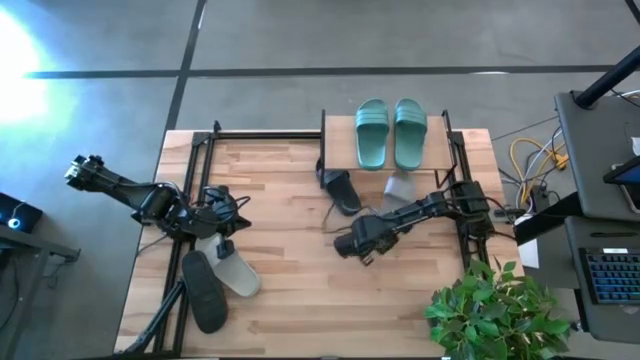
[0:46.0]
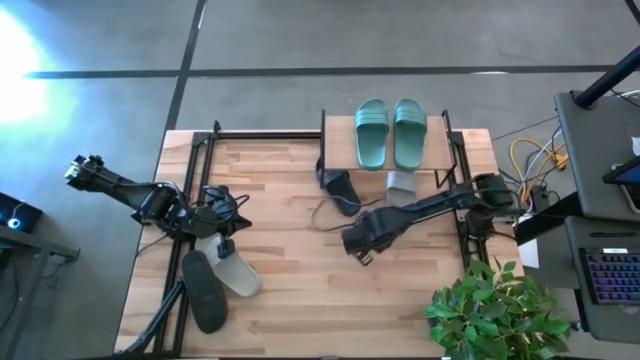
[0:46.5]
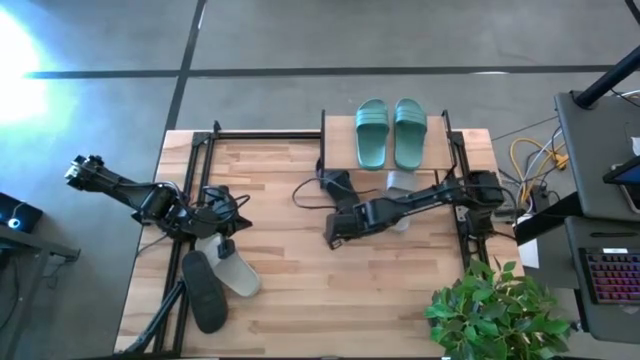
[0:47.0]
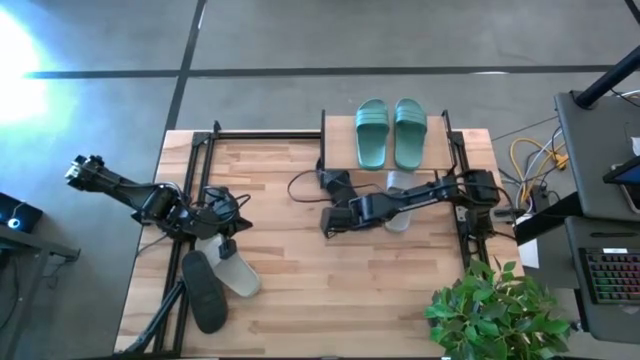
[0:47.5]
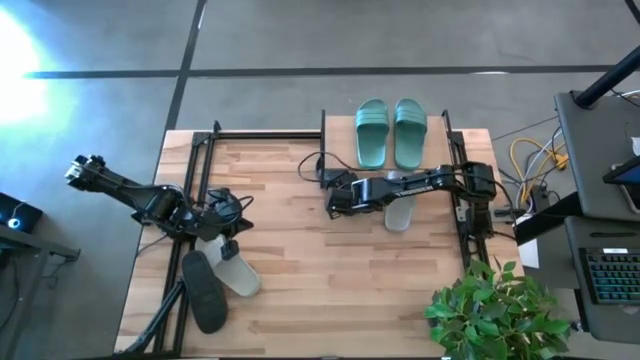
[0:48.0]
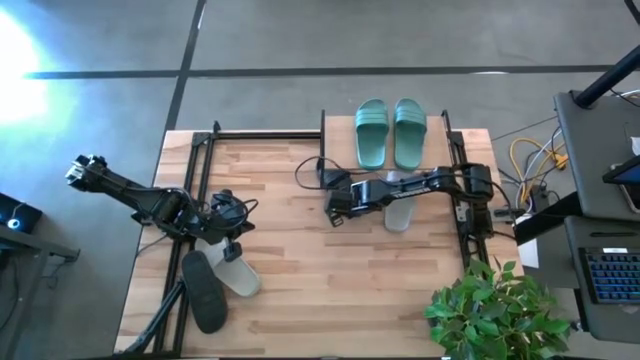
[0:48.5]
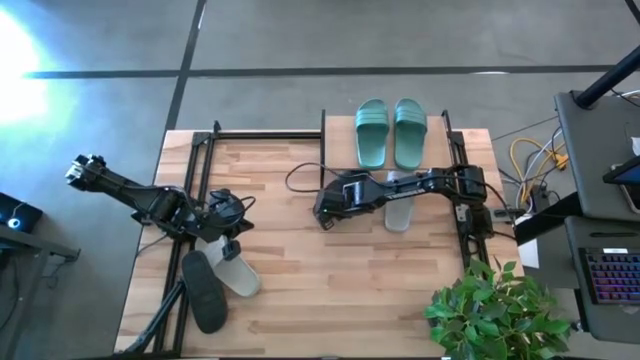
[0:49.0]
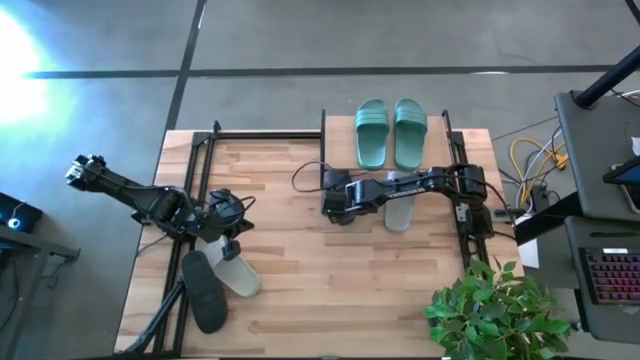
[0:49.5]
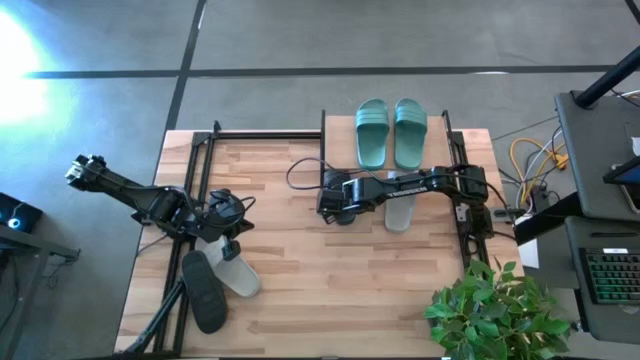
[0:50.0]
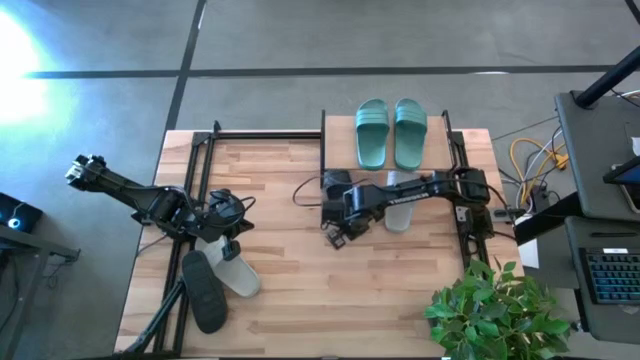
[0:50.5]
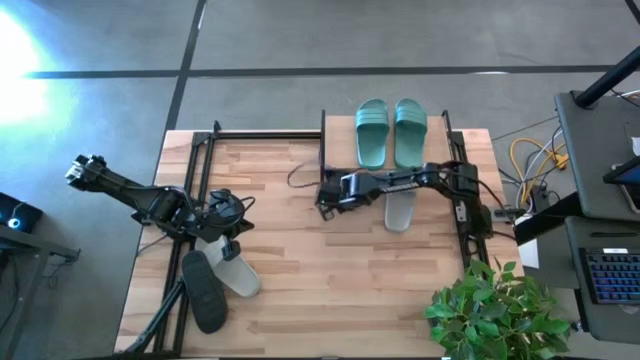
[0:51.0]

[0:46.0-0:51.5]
Task: Pick and place slides into the shelf
Adjust the black slipper under the shelf

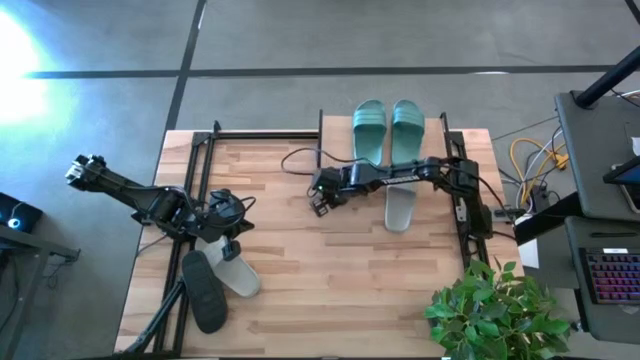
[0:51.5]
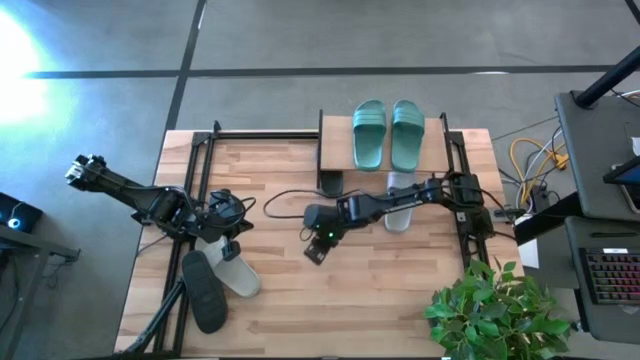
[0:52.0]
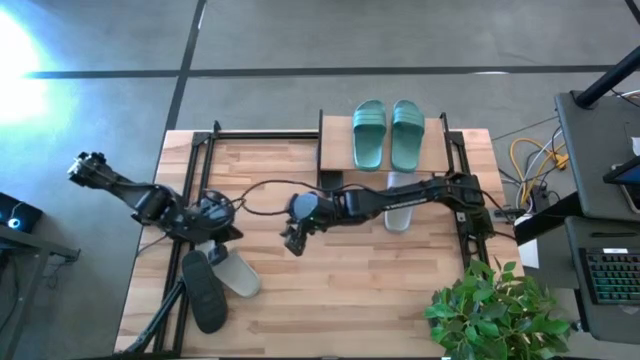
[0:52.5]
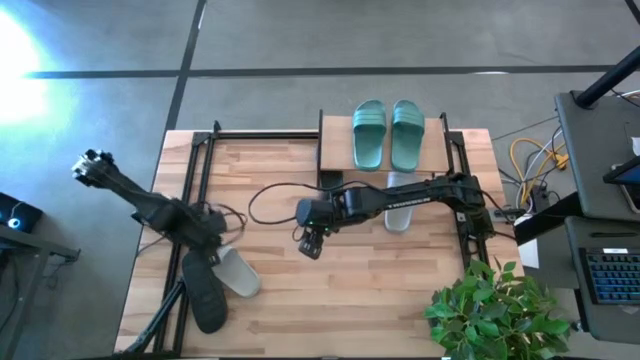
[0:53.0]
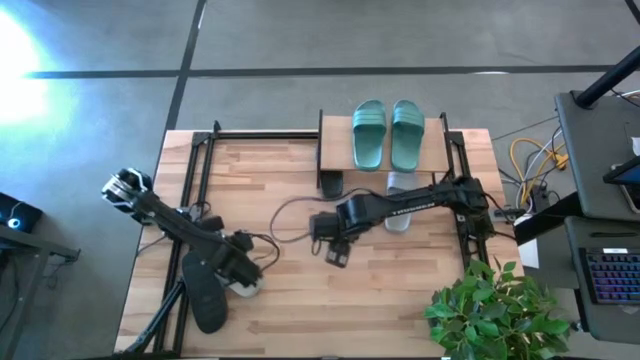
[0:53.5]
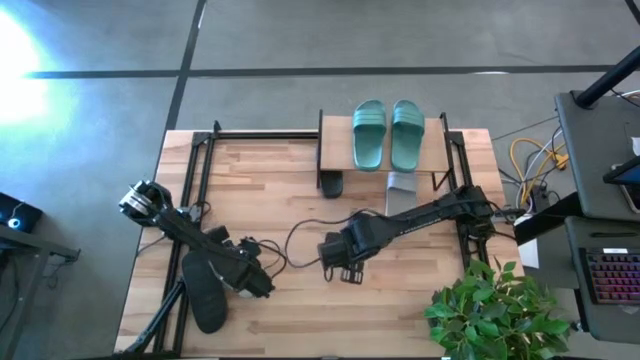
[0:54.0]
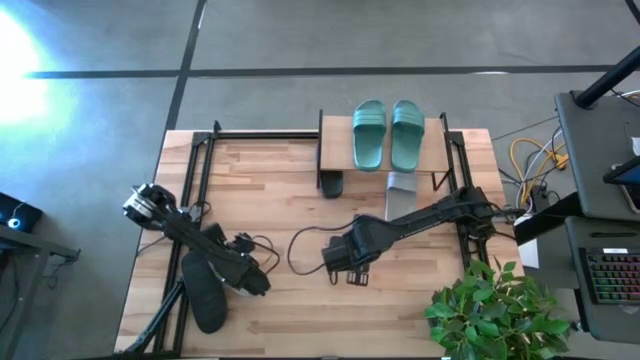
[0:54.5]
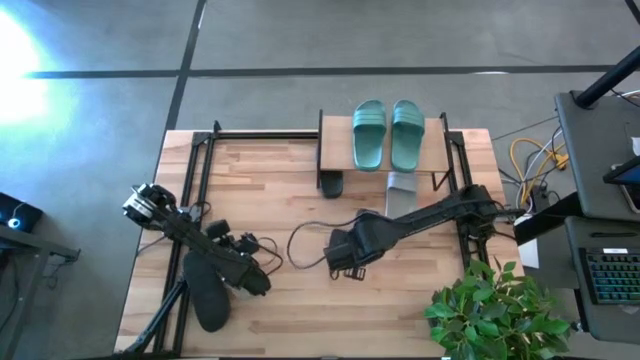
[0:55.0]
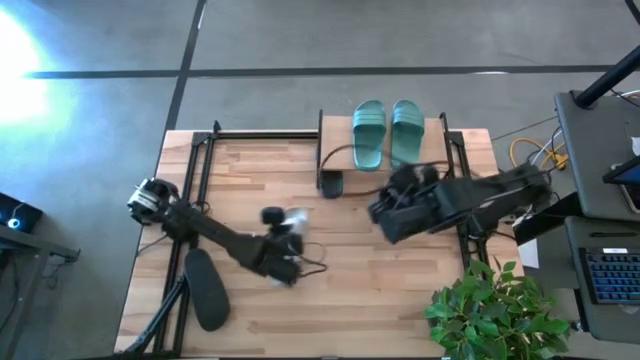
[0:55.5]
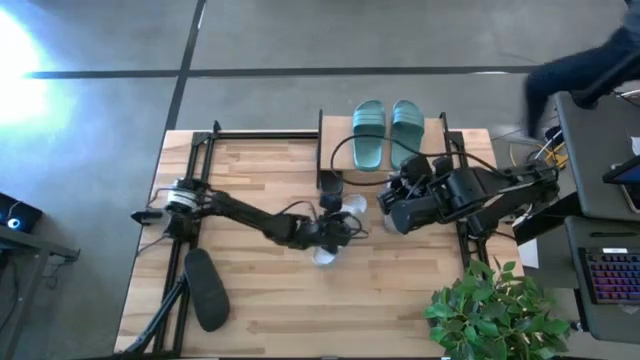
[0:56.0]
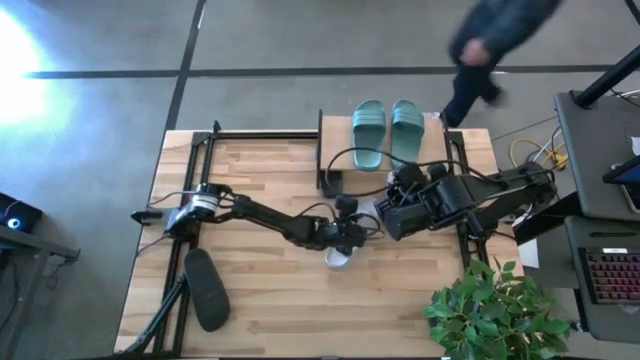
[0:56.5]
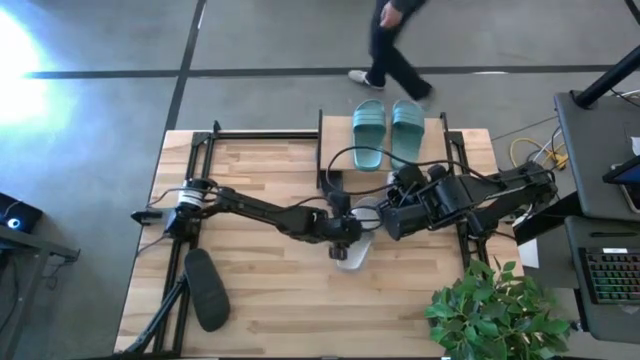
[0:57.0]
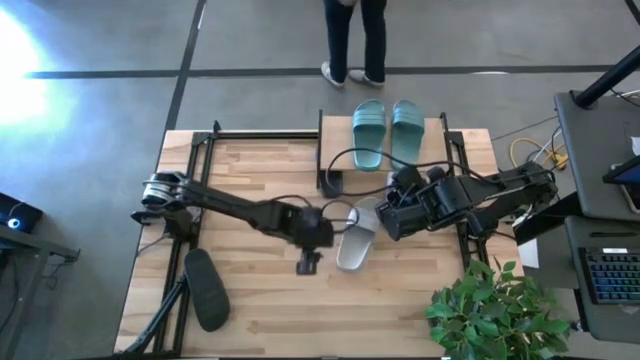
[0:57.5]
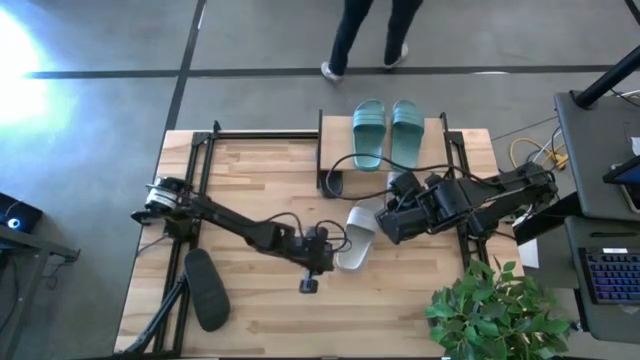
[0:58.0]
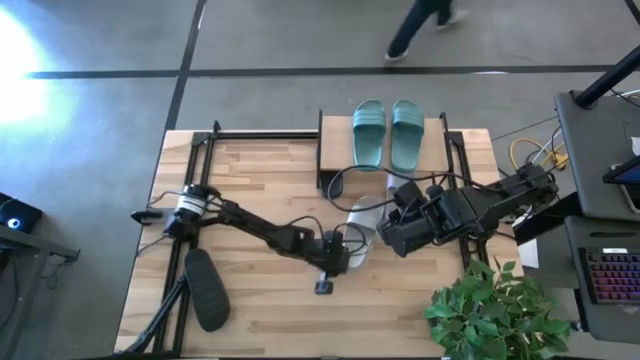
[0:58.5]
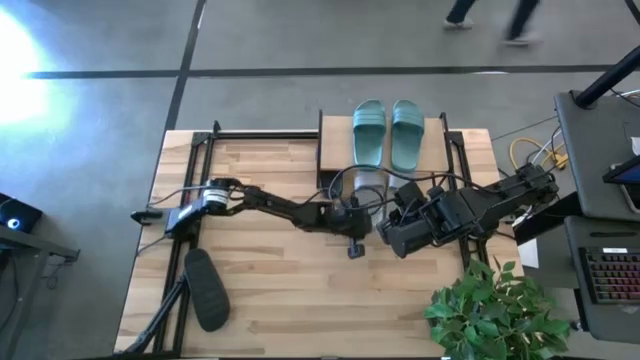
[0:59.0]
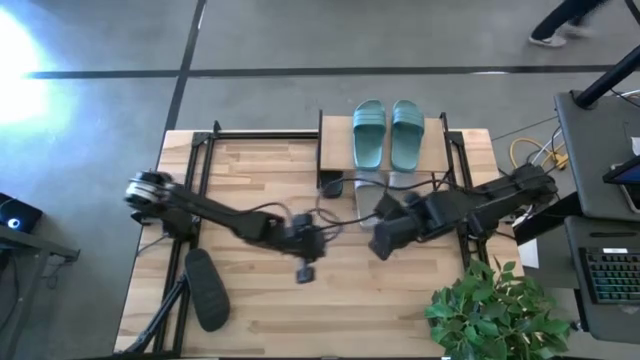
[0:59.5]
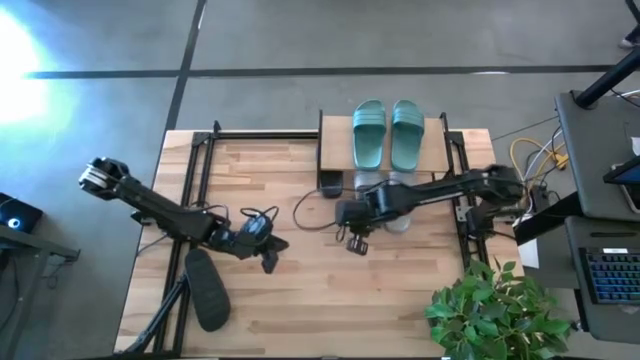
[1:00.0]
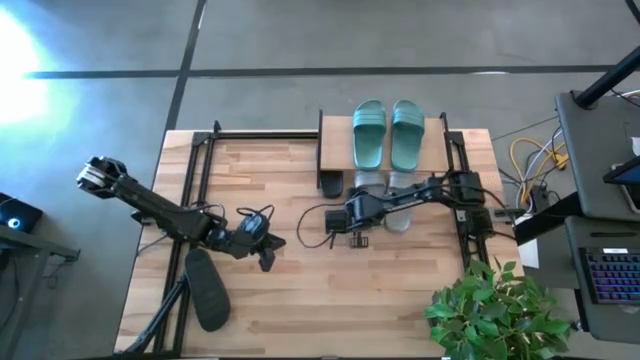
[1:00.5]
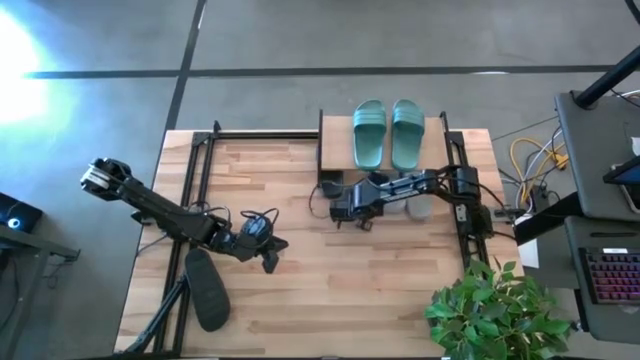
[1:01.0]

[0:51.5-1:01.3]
Put the gray slipper under the shelf

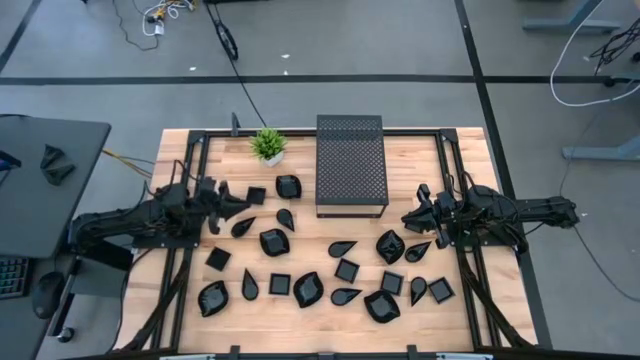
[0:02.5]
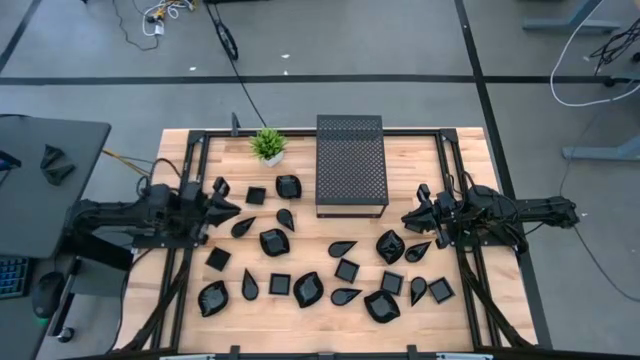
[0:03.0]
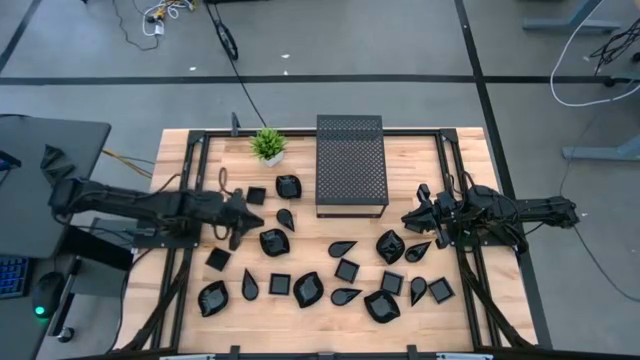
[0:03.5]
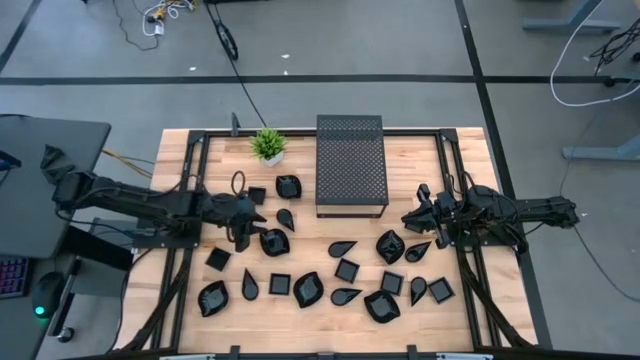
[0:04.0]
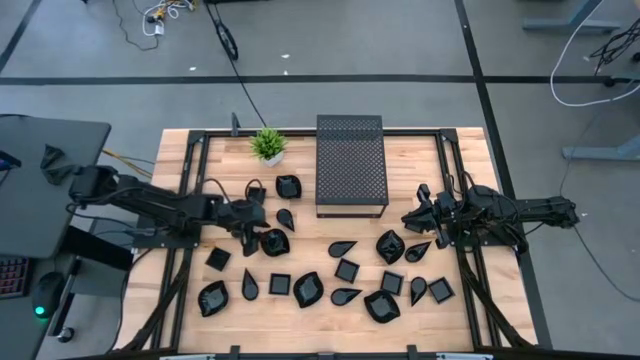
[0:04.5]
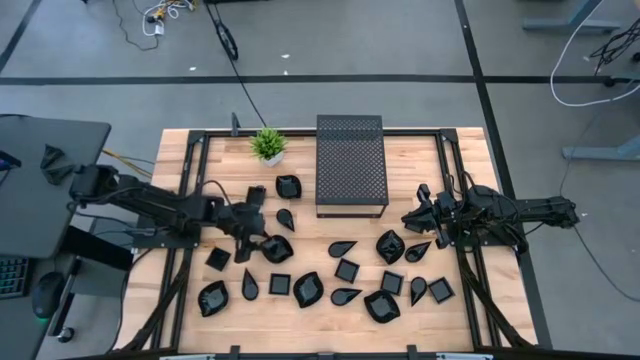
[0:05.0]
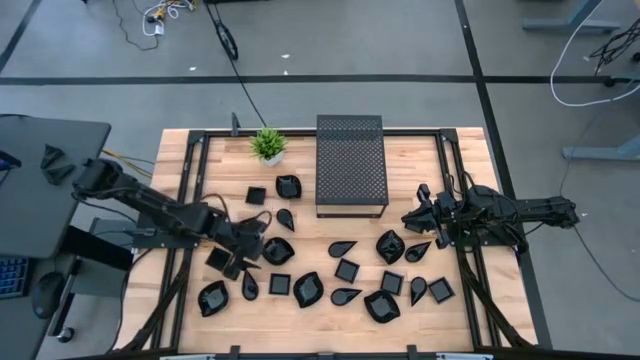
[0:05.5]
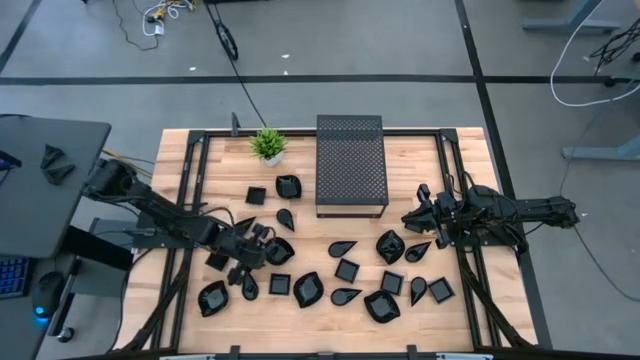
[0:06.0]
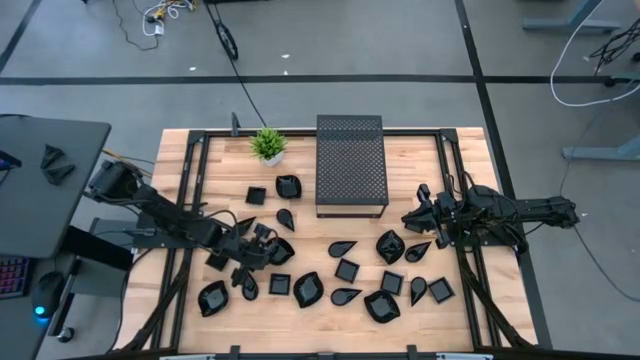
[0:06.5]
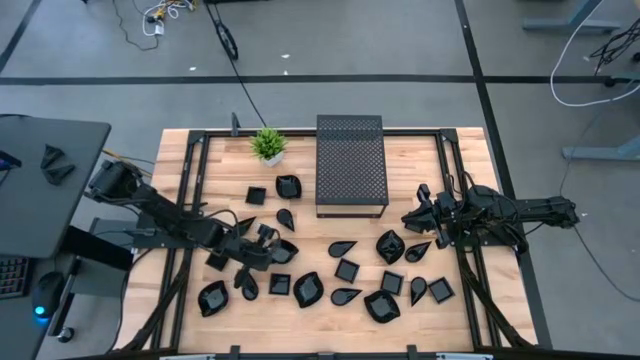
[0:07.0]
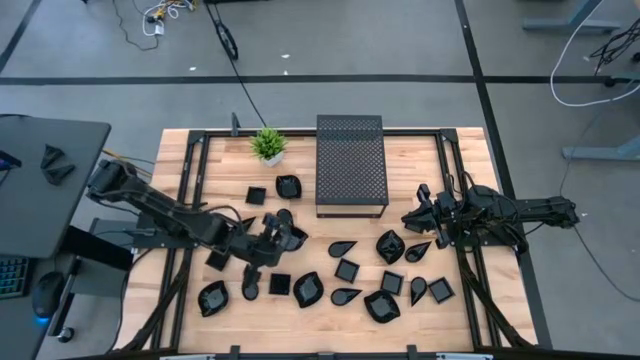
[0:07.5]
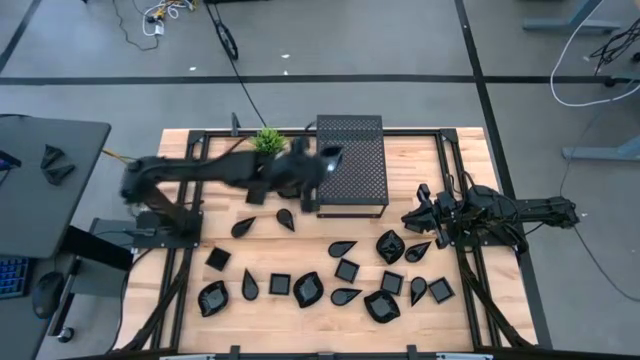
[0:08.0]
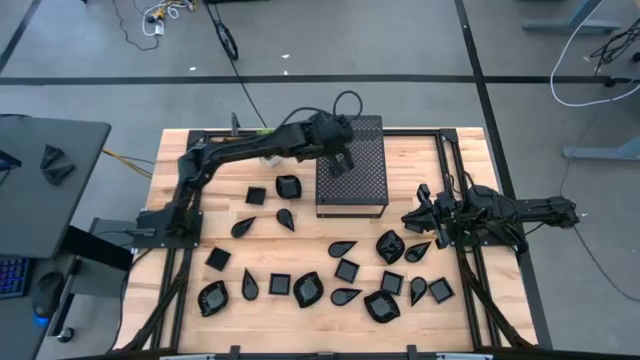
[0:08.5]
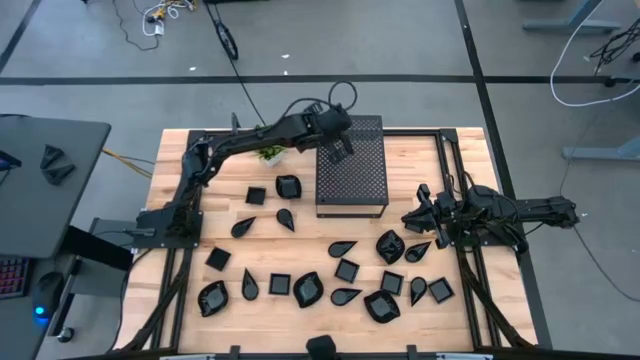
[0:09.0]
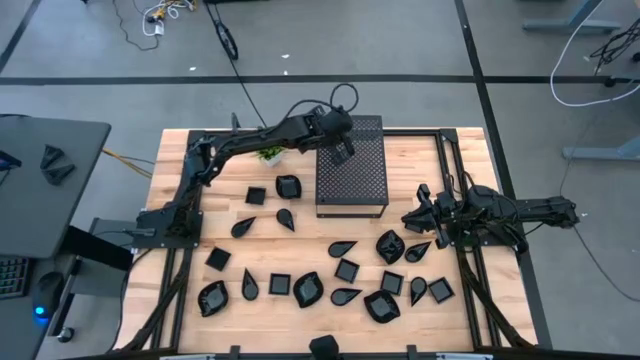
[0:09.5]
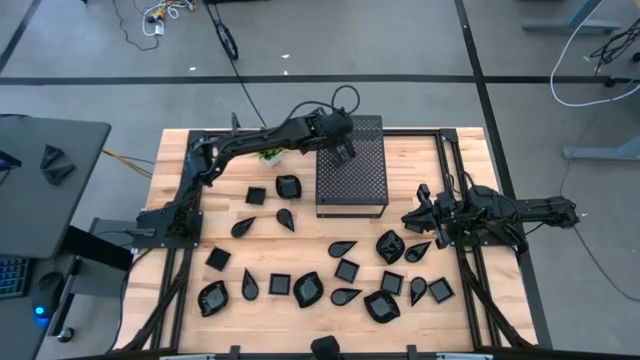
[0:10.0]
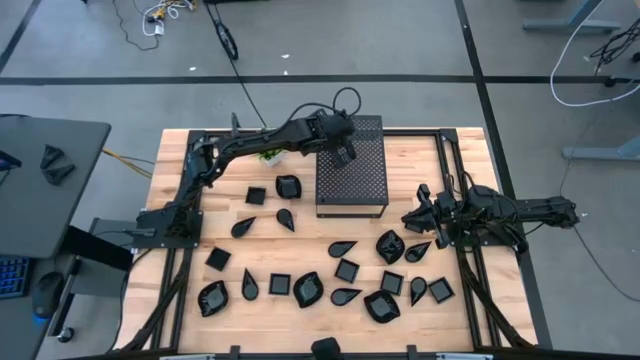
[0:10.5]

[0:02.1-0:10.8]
Task: Pick & Place Mini shaped plates
Put the leaf shaped plate on the shelf
